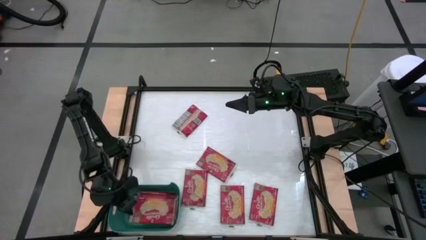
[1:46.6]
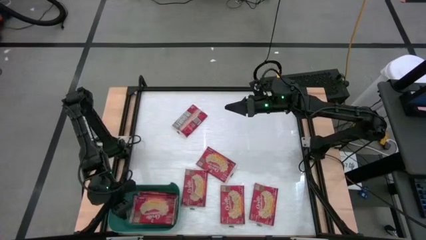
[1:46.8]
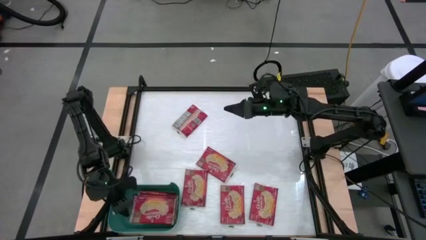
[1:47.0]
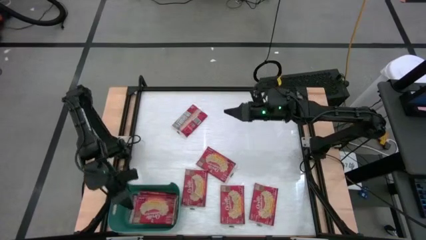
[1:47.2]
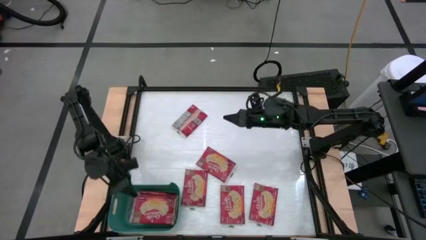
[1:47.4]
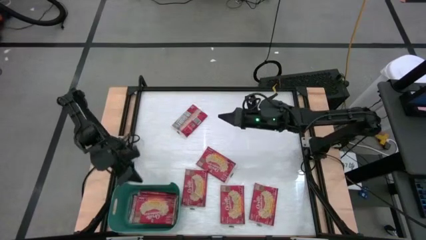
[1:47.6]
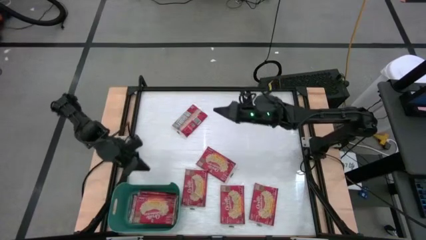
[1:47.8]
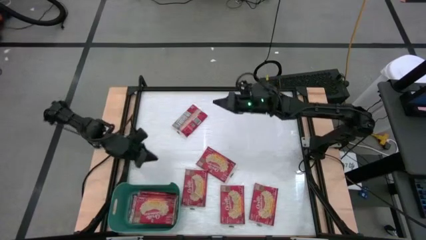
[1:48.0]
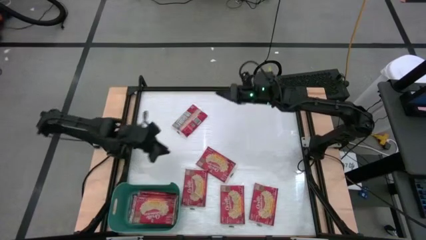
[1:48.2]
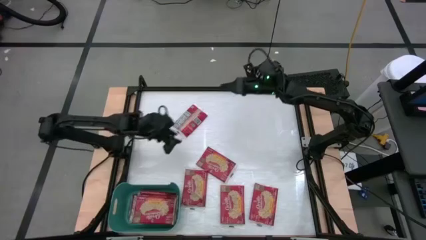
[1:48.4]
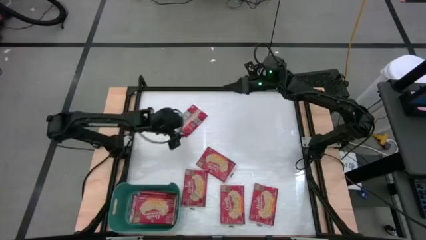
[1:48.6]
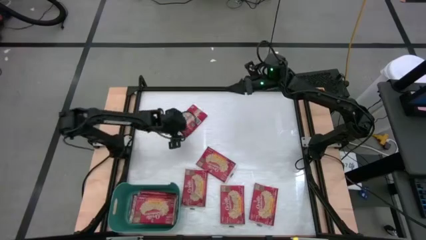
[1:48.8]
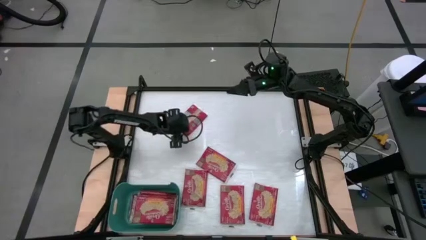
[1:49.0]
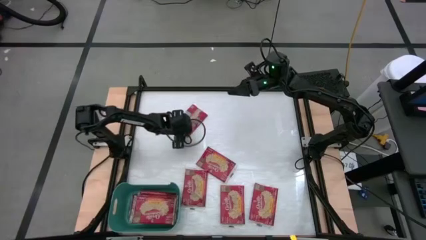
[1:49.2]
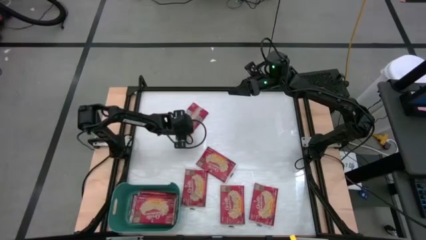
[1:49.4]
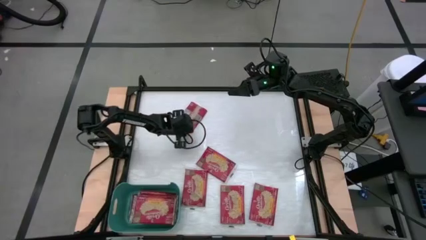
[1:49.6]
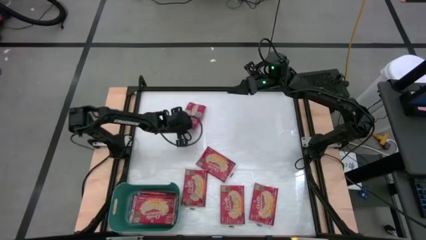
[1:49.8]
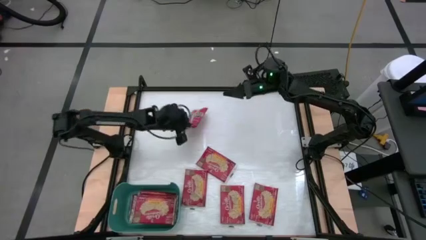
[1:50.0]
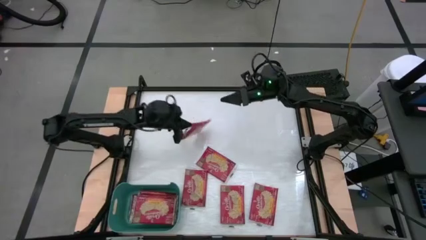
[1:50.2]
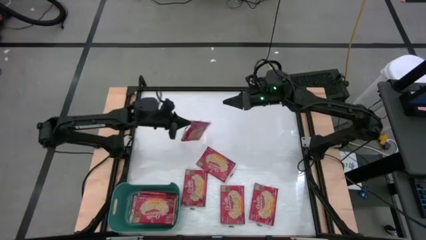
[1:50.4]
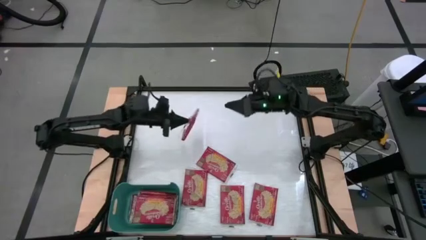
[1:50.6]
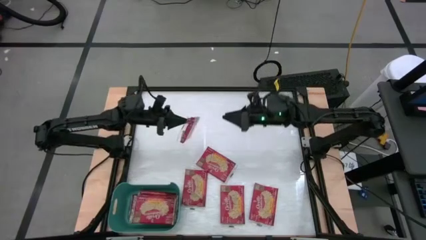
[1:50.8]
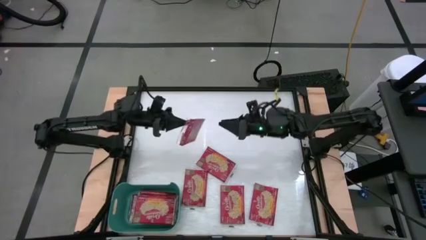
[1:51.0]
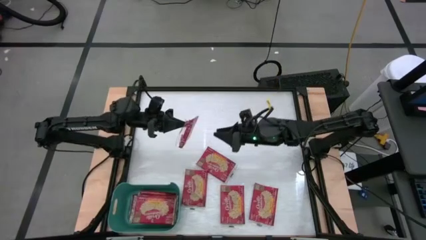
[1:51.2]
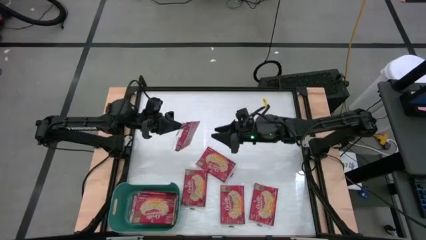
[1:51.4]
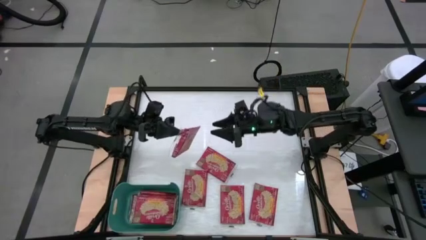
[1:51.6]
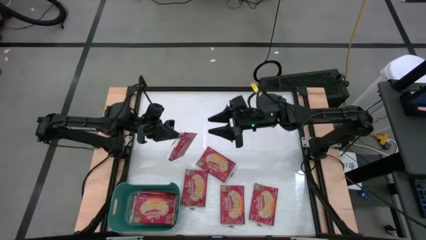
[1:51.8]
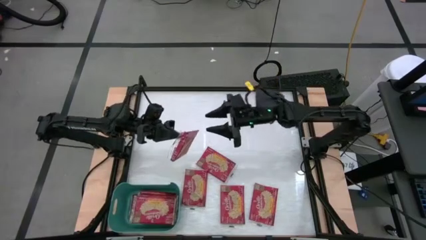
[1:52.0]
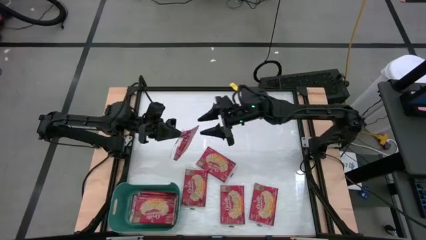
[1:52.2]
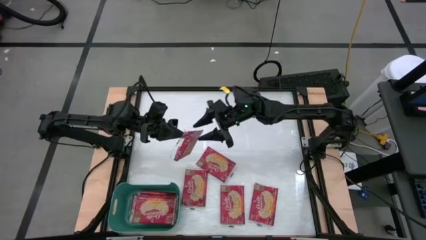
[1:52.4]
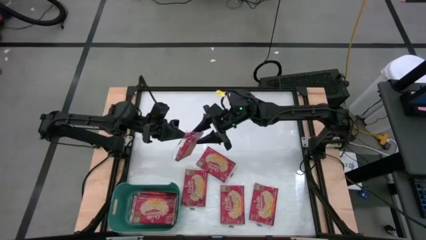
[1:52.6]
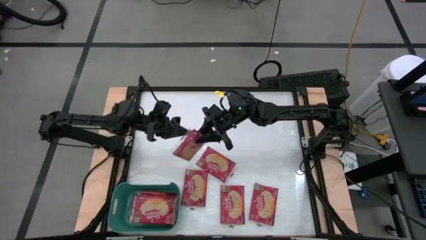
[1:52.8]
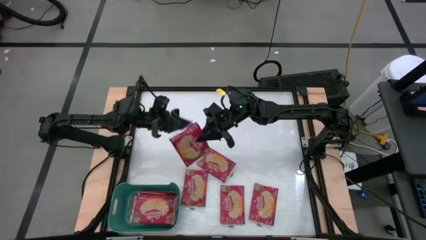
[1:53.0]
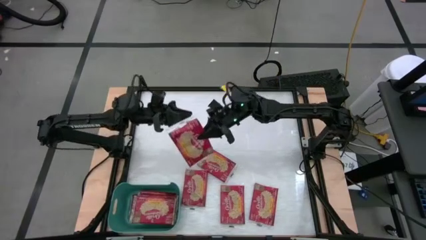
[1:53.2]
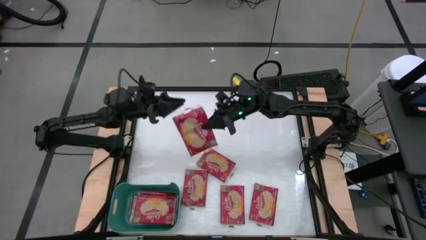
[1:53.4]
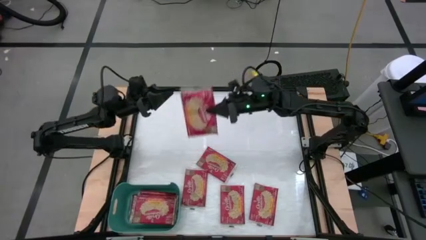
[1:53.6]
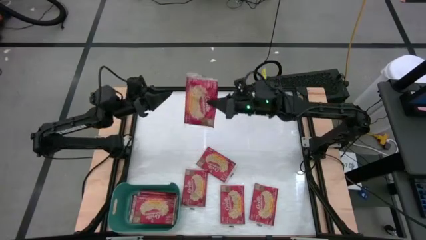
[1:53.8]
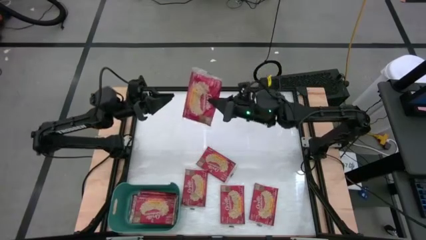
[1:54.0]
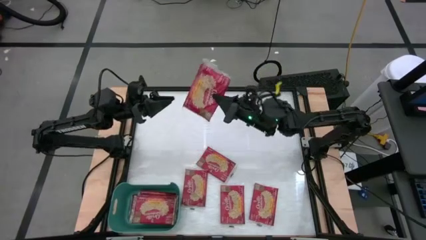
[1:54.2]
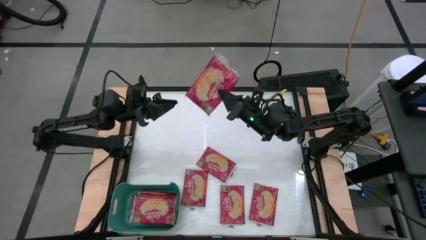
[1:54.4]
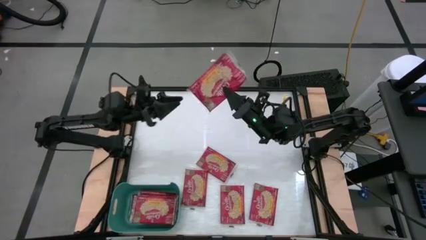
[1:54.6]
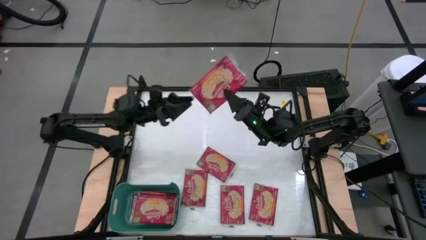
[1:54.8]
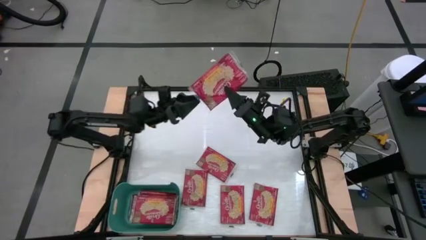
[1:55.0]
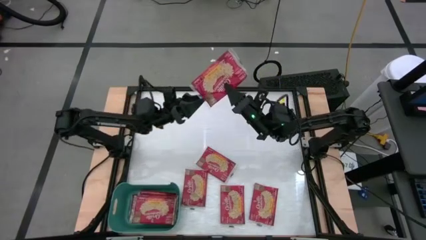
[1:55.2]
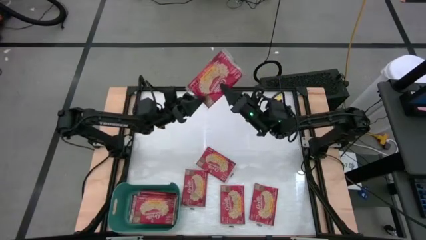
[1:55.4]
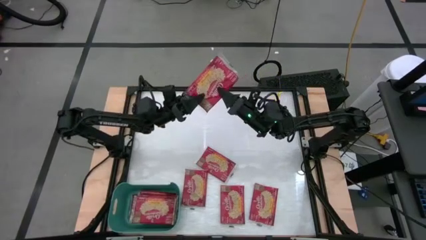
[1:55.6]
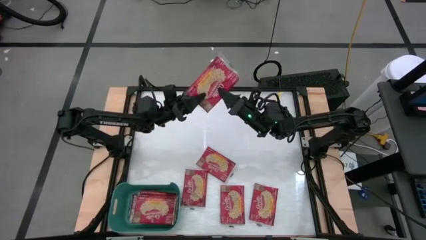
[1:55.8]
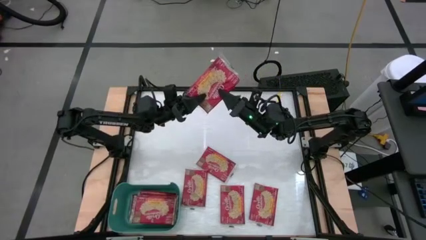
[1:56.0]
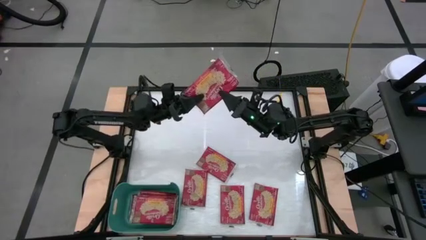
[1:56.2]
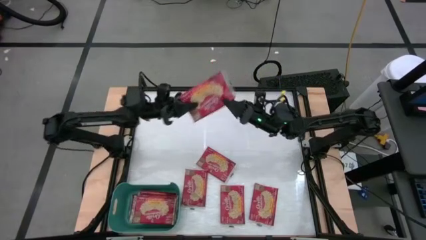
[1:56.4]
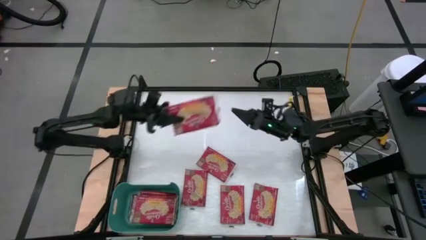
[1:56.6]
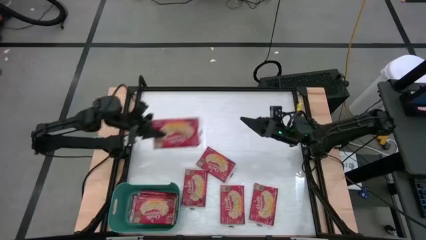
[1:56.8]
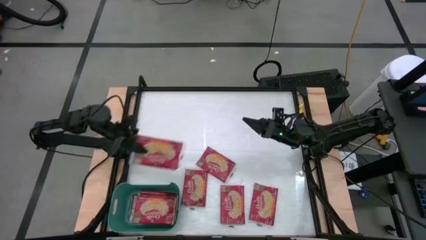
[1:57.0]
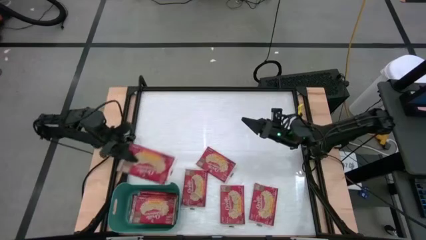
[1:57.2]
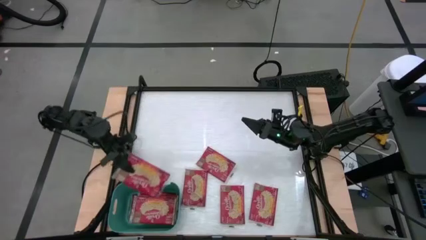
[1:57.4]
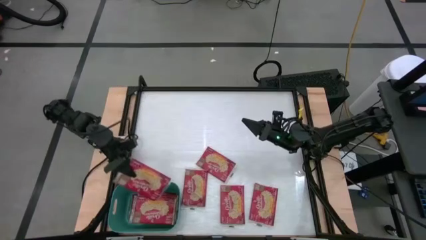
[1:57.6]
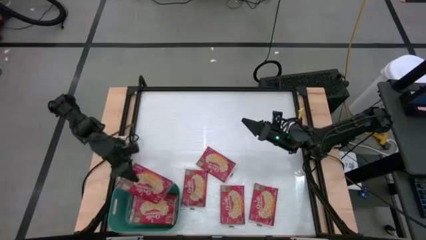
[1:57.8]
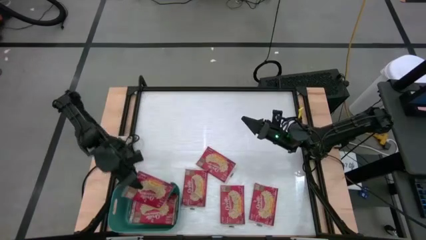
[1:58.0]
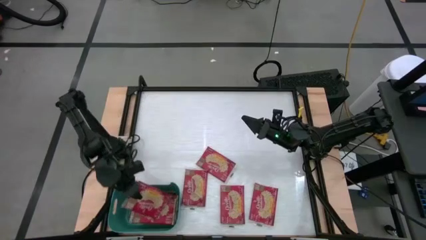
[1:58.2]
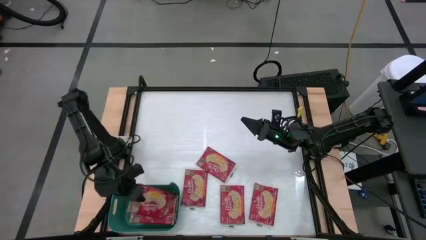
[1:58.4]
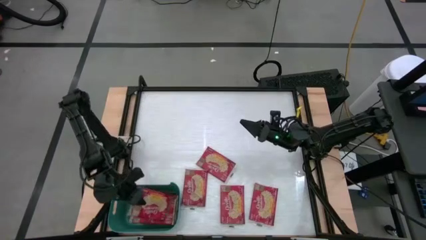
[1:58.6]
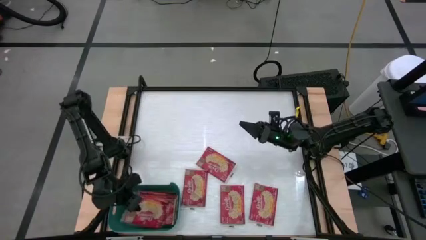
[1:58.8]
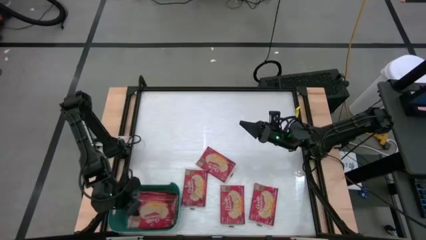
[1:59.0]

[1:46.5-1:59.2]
Task: Sort popcorn bags into baskets
Put the red popcorn bag into the green bin

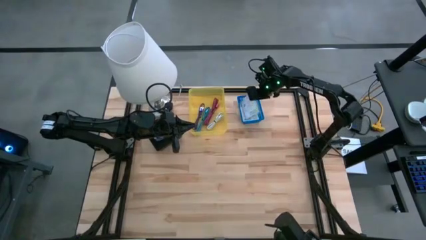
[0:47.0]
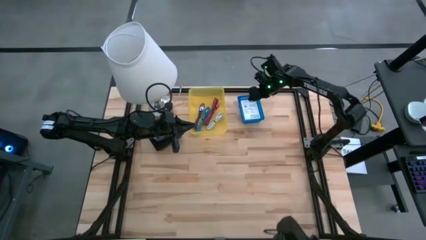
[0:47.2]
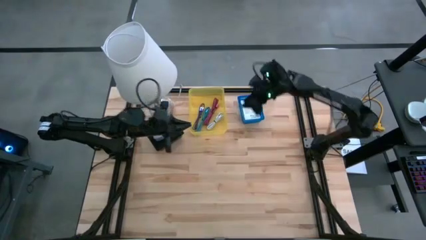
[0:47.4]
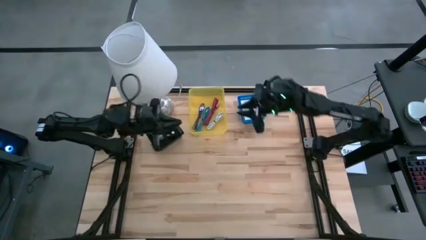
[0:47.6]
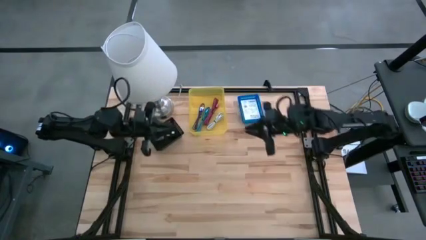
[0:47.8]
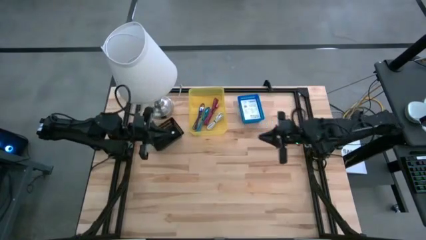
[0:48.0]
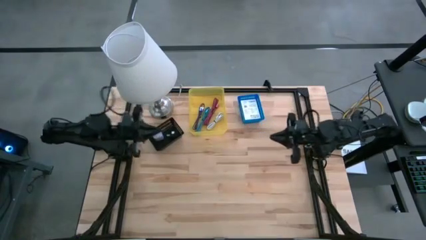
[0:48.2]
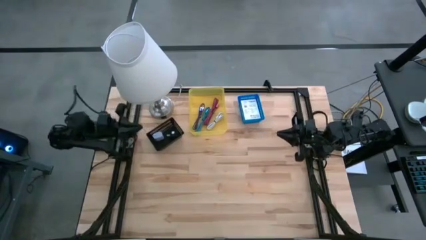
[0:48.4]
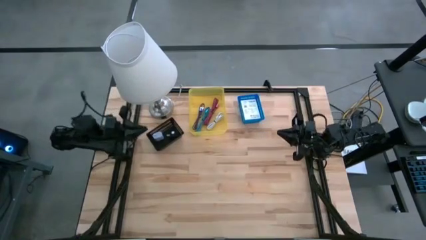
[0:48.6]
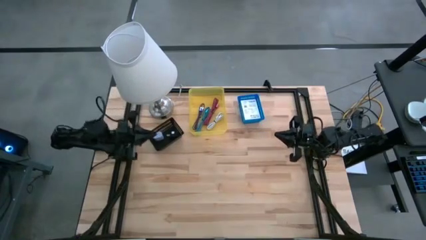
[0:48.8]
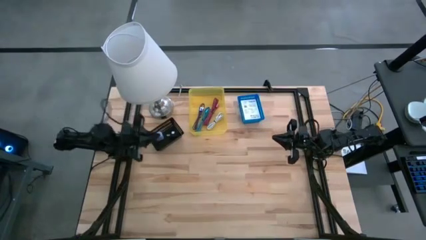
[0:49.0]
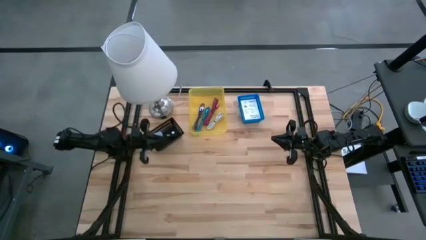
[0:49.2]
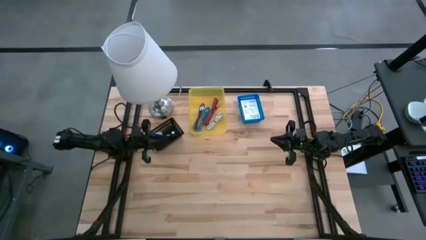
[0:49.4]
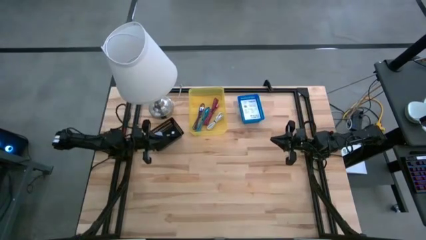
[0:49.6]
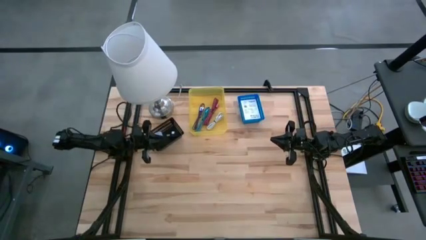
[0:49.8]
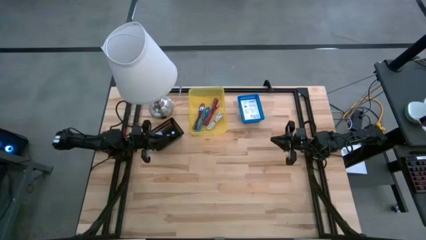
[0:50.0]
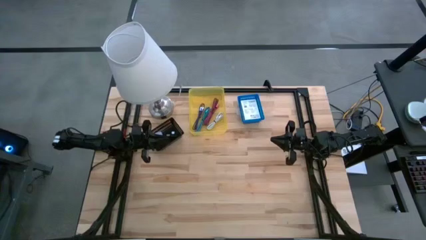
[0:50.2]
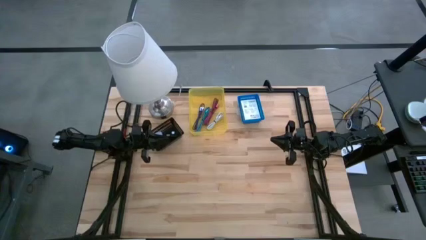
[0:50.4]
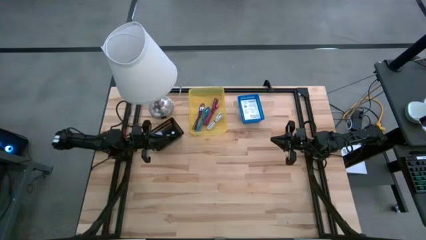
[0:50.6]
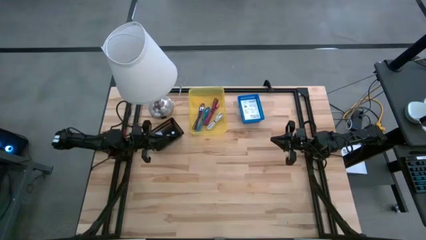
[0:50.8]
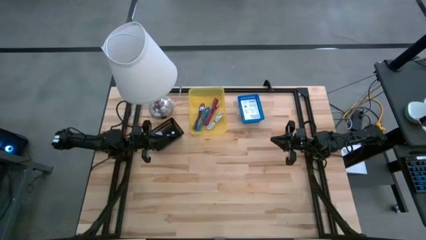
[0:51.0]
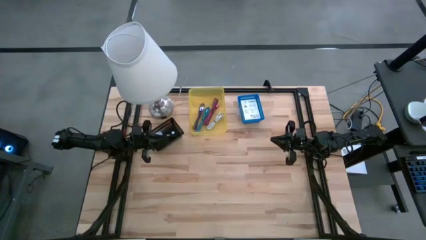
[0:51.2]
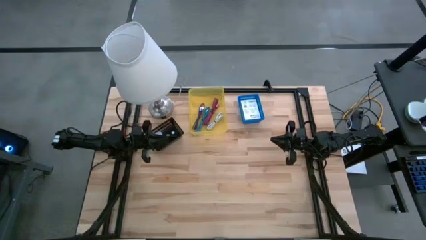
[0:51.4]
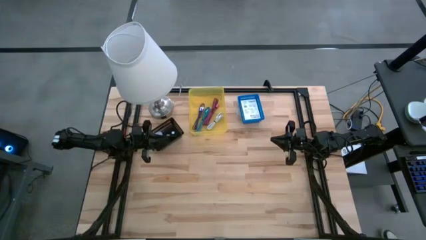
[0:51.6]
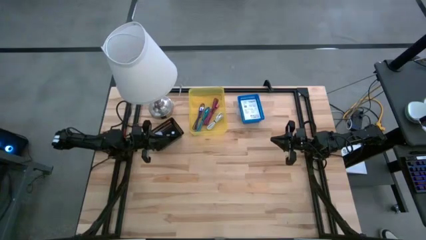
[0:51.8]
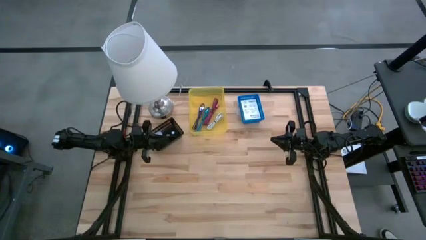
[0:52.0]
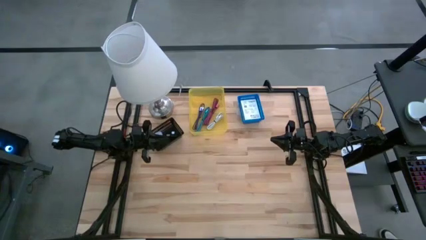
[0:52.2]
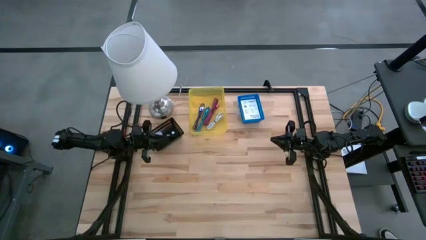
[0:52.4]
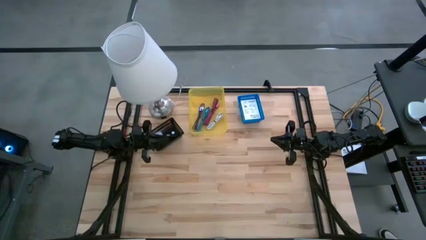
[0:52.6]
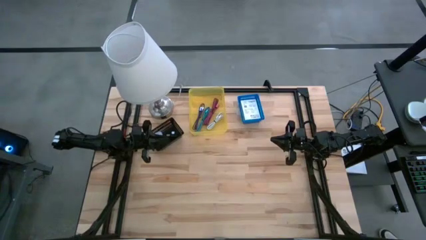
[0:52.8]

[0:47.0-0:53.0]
Task: Pick and place items into bin
Return to Home Position
